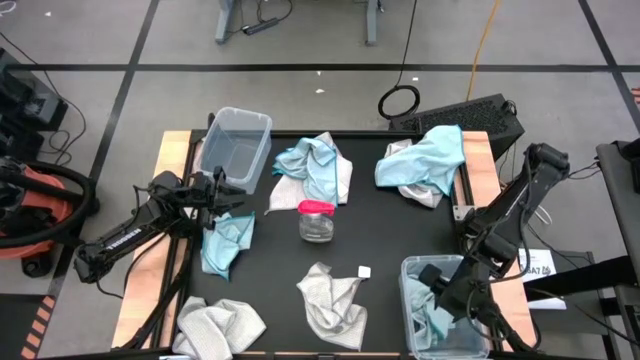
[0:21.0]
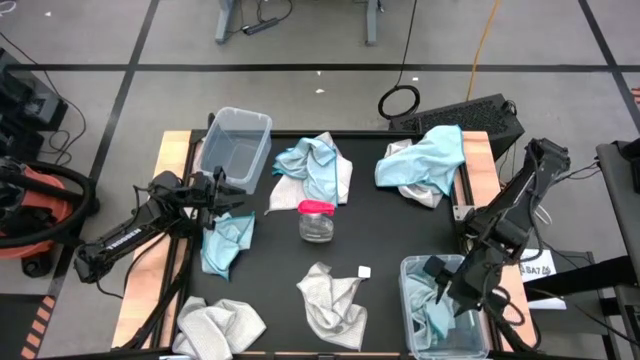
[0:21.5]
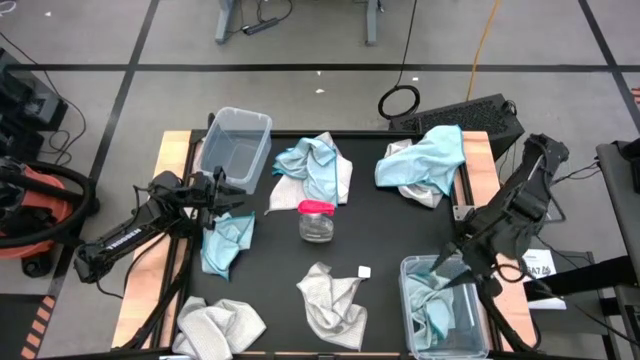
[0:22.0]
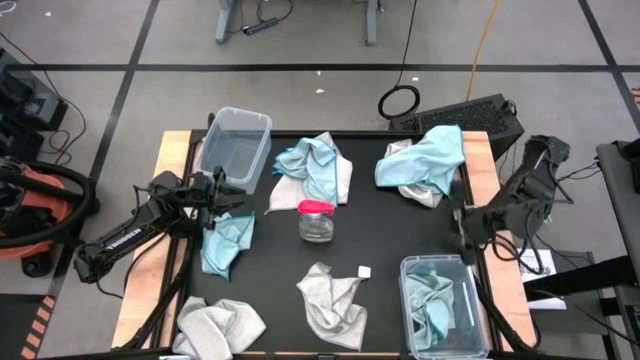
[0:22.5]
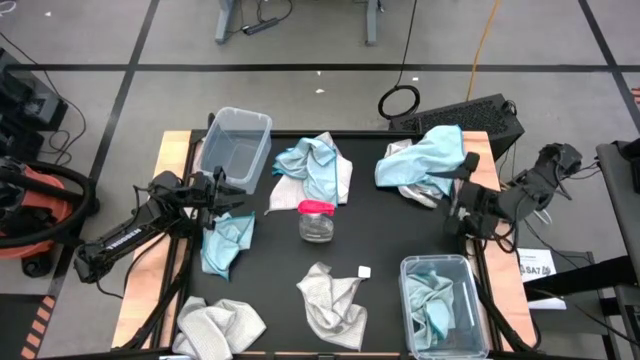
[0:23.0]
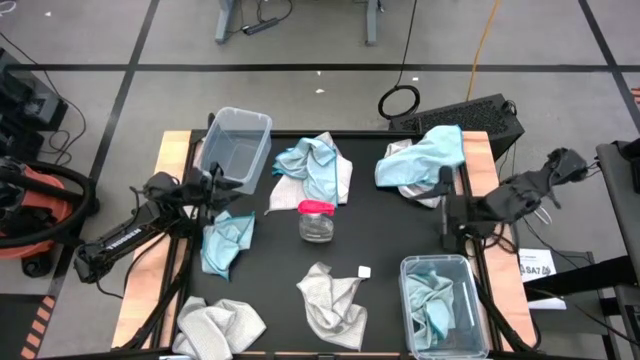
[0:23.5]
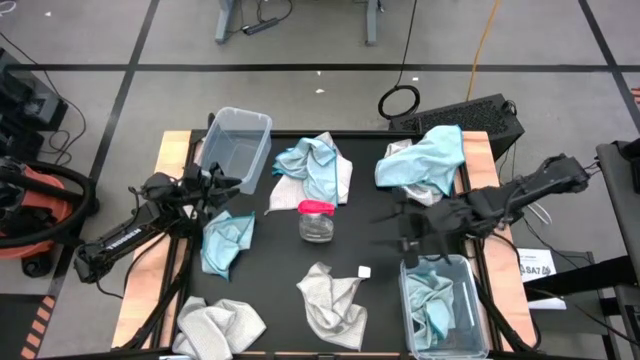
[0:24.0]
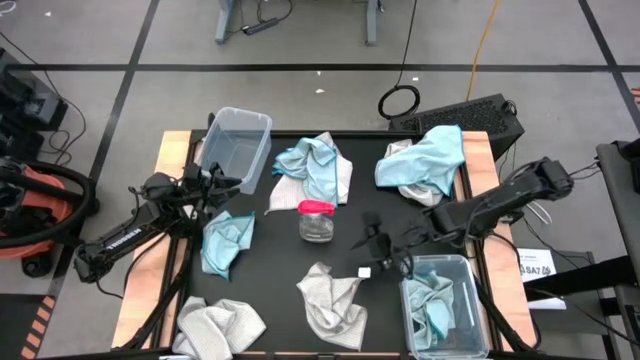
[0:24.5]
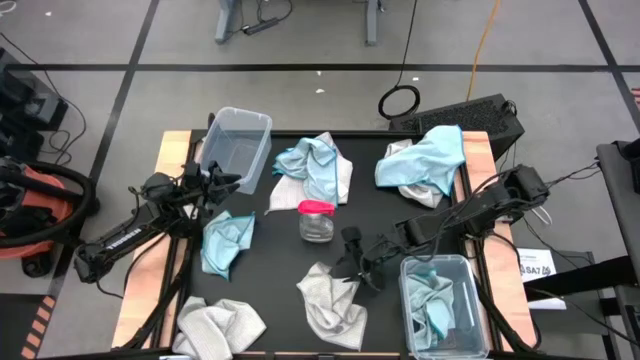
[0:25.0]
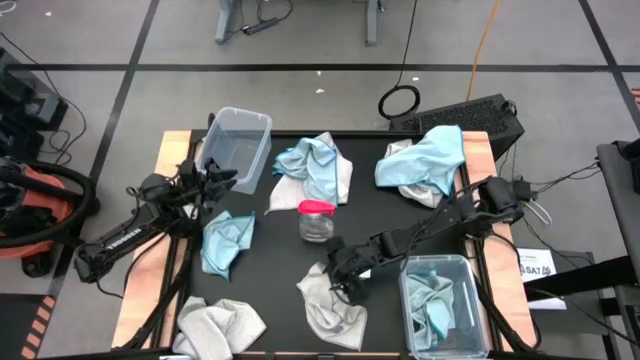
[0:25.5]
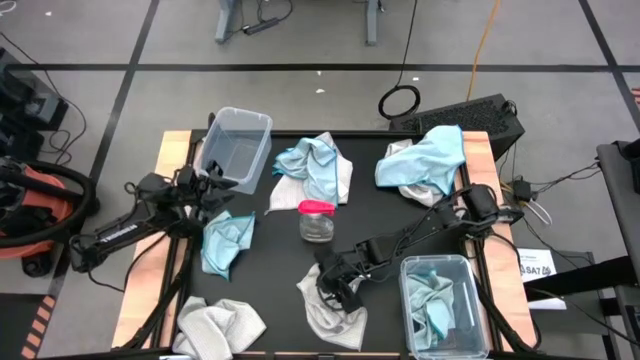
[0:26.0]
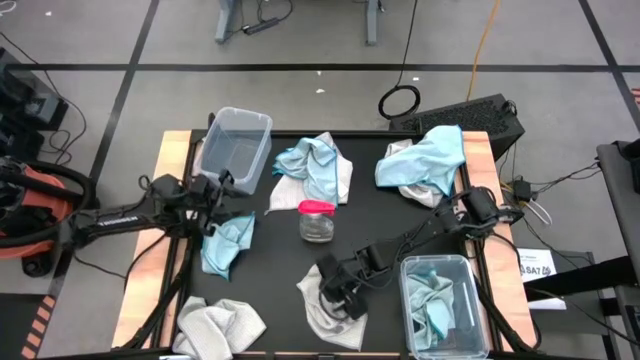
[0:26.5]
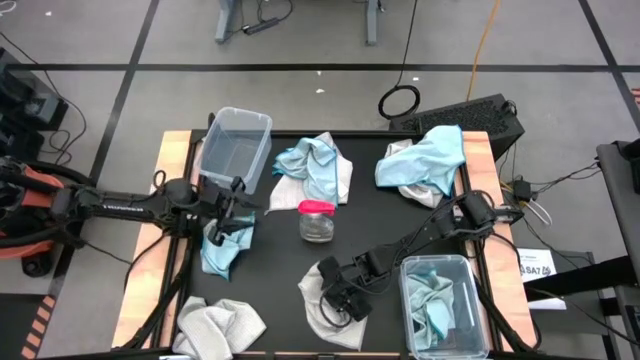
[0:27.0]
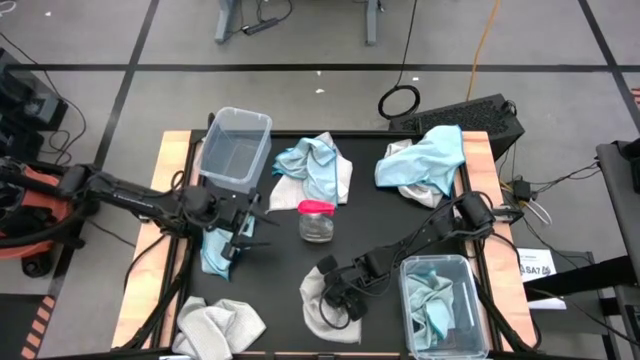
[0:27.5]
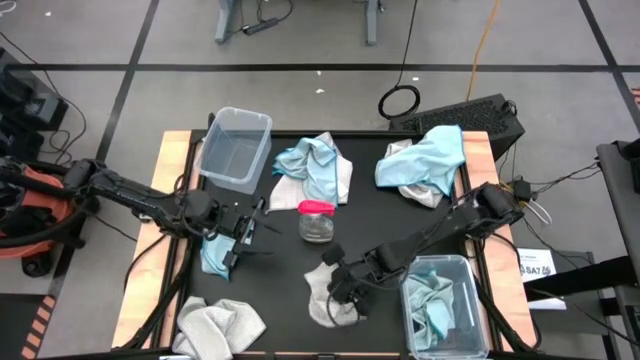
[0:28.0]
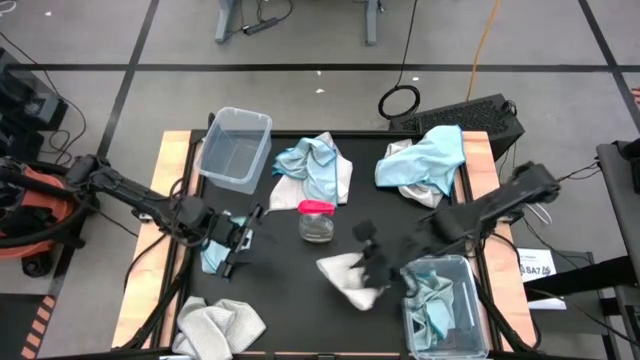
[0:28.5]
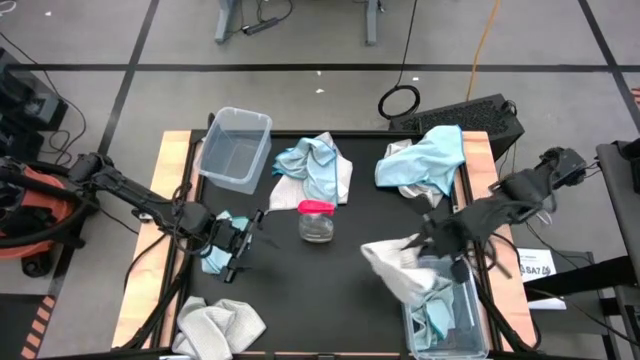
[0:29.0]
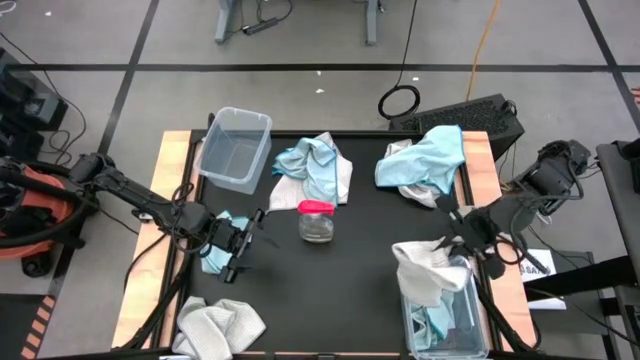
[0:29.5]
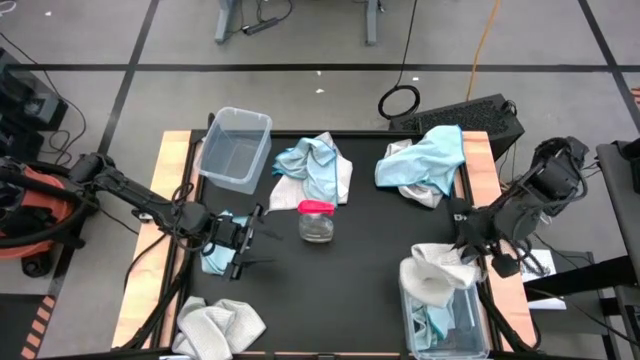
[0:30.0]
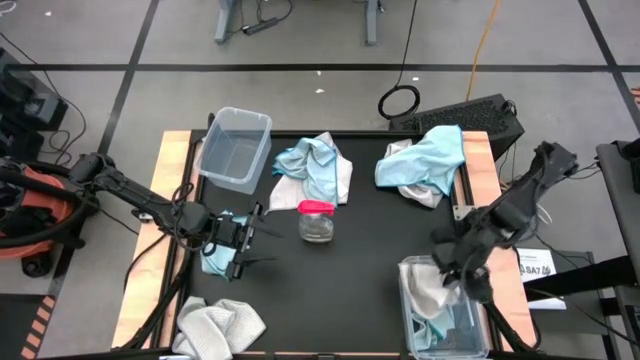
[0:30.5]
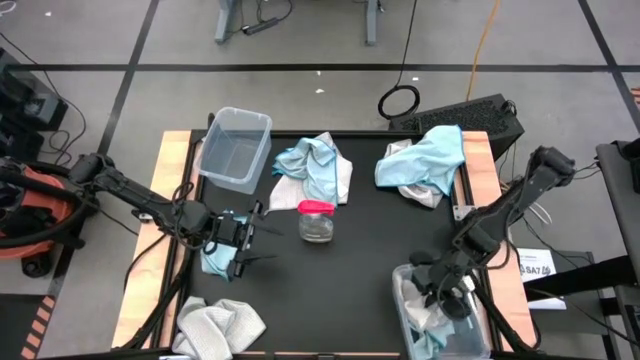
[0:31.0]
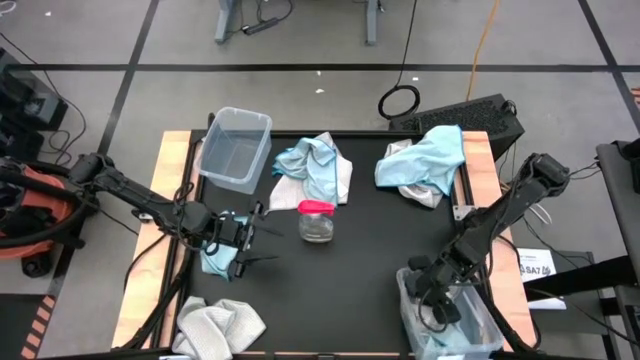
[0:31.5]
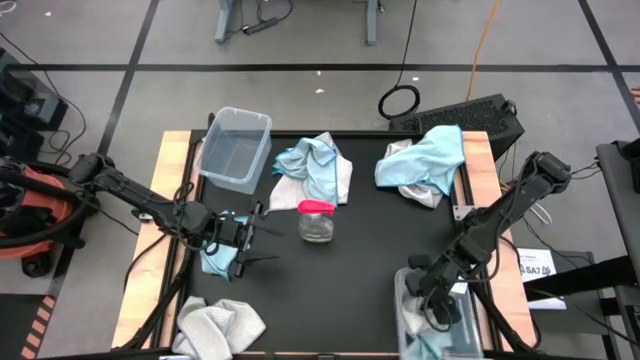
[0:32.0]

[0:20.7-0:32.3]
Task: Sort microfiber towel by color & place in baskets
Put the bottom right gray towel into the left transparent bin

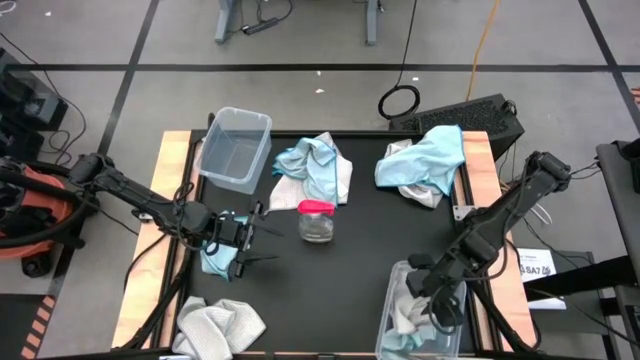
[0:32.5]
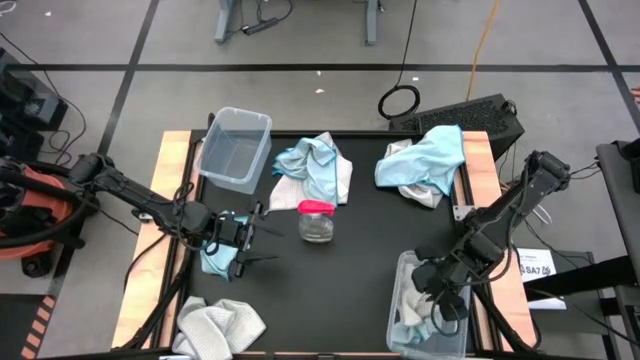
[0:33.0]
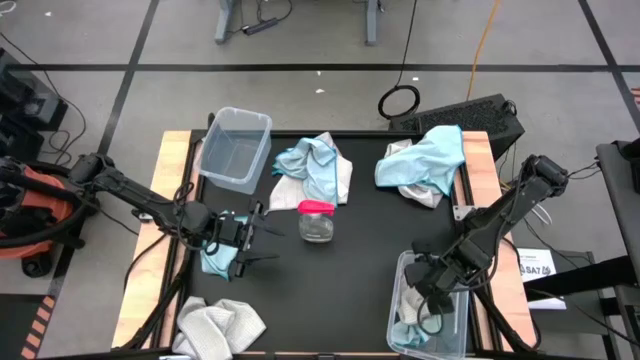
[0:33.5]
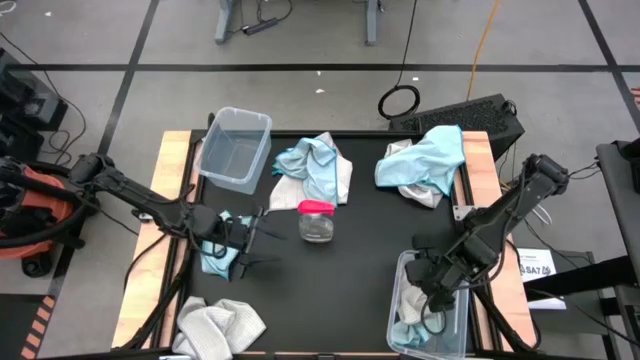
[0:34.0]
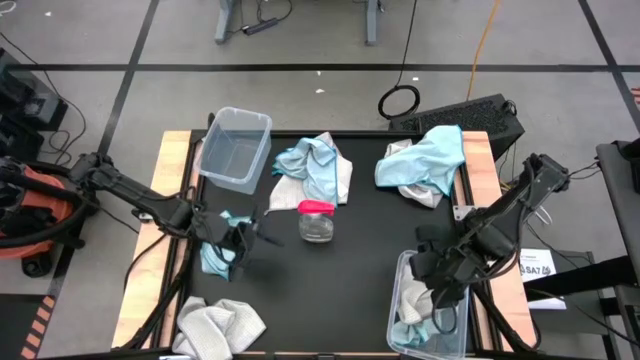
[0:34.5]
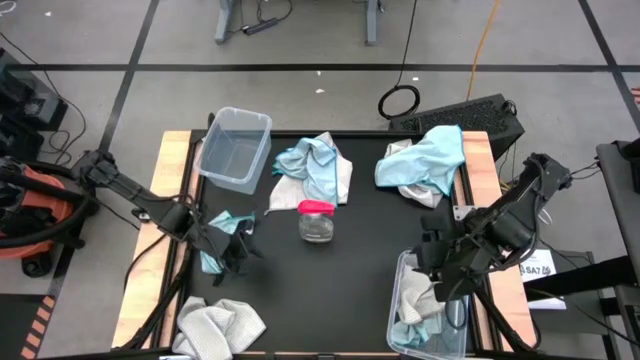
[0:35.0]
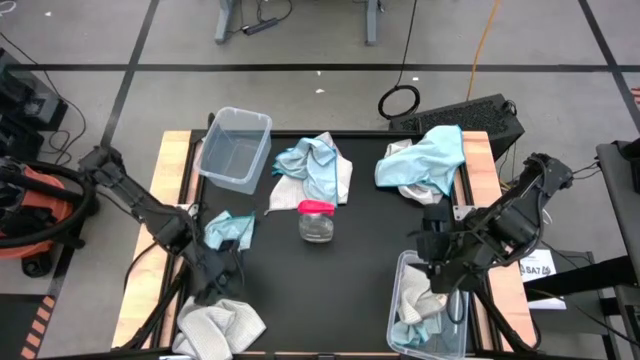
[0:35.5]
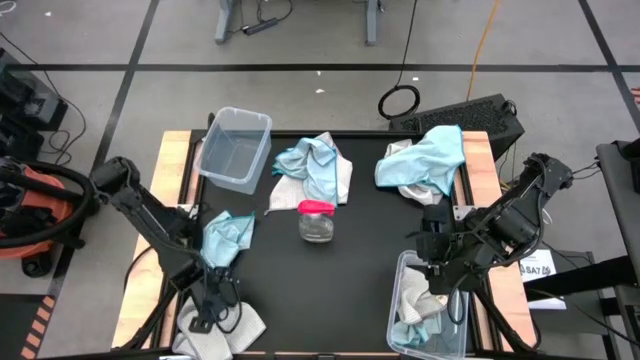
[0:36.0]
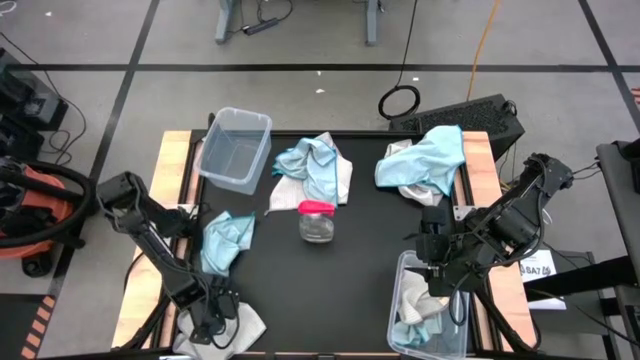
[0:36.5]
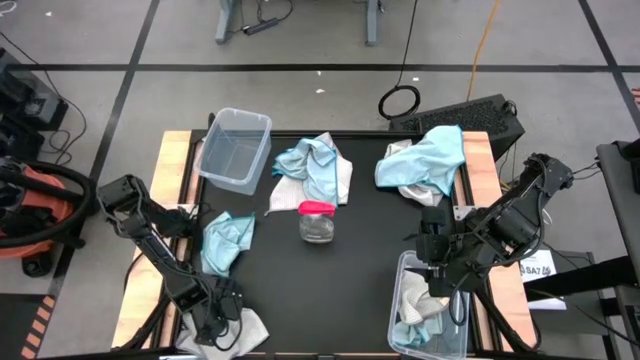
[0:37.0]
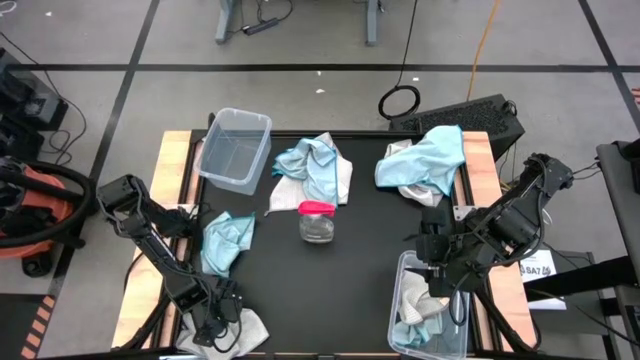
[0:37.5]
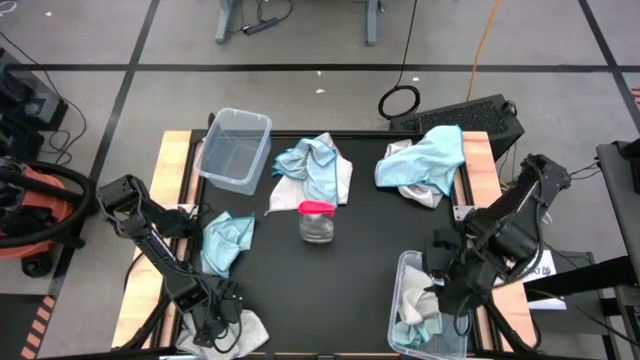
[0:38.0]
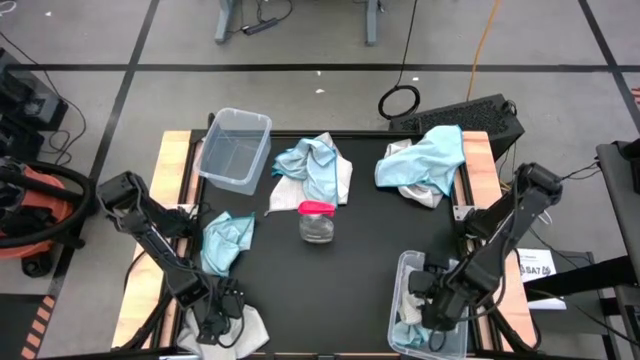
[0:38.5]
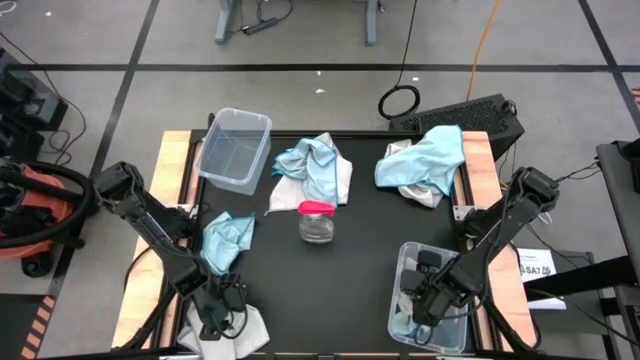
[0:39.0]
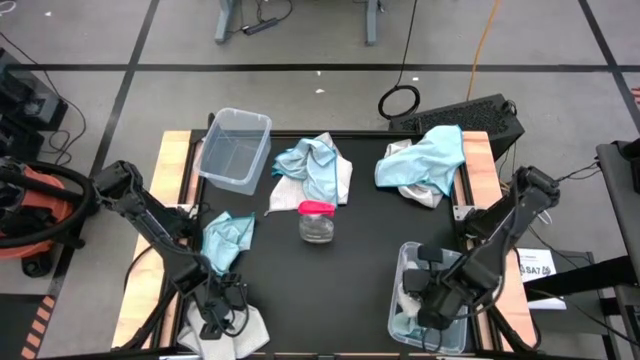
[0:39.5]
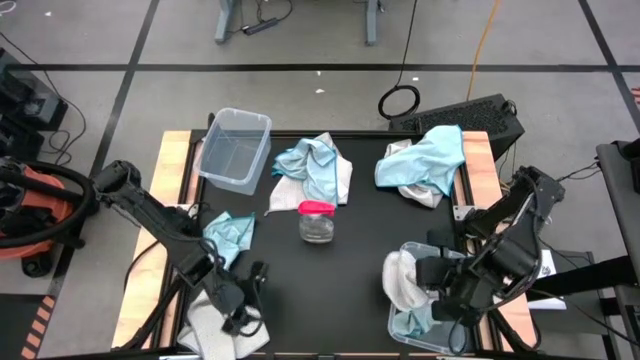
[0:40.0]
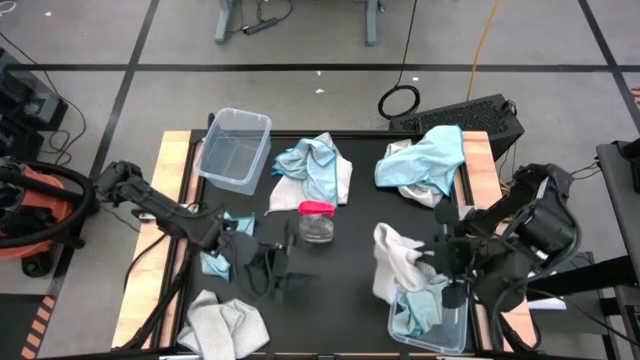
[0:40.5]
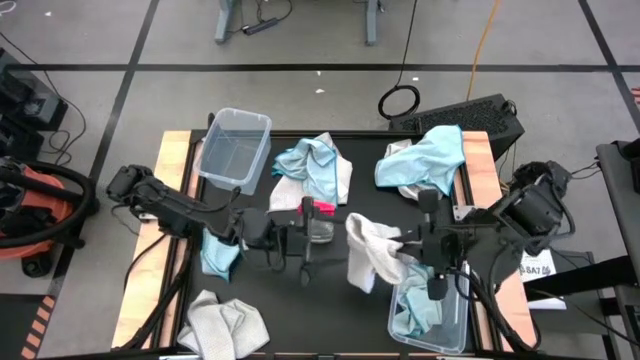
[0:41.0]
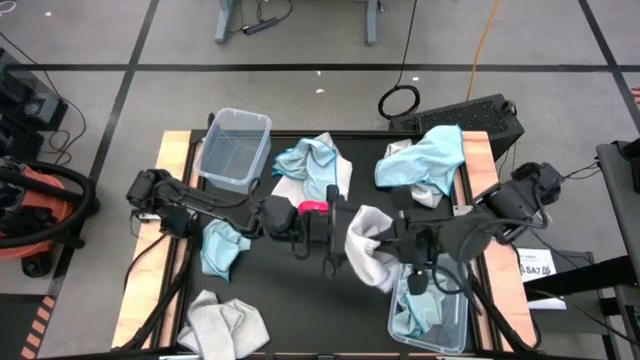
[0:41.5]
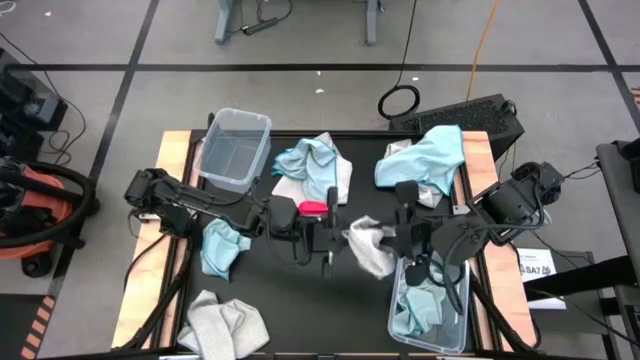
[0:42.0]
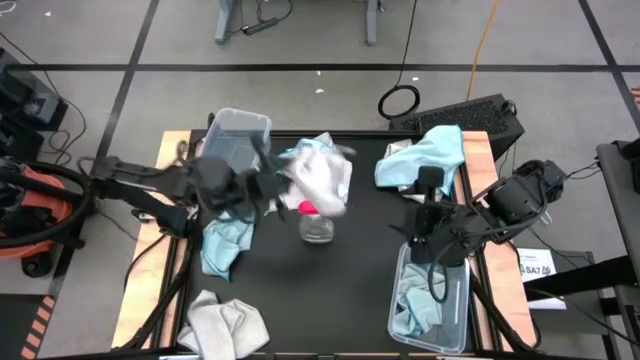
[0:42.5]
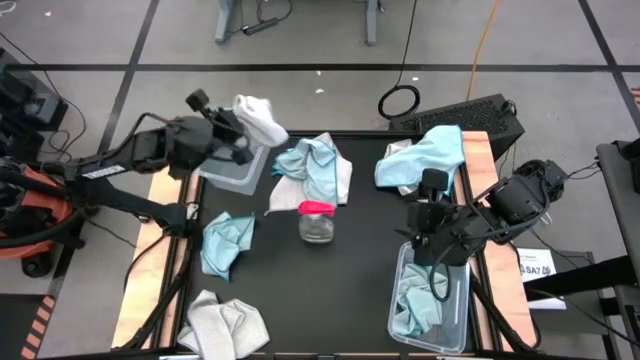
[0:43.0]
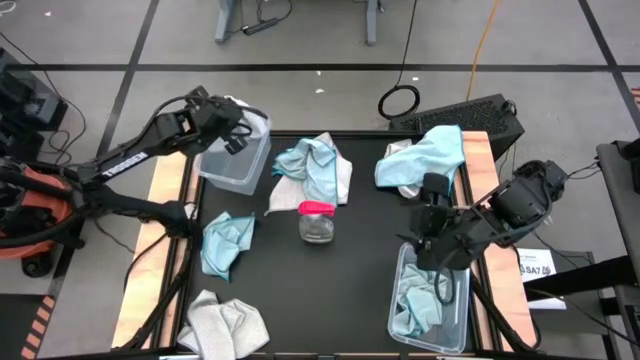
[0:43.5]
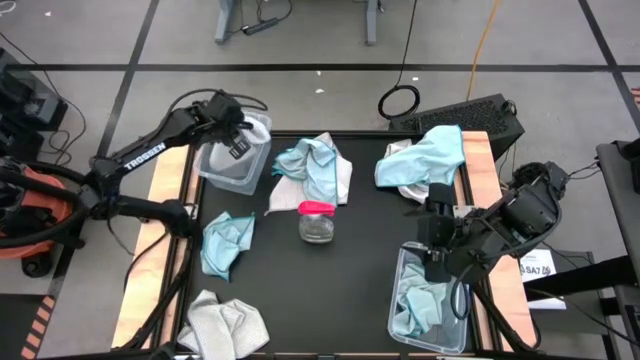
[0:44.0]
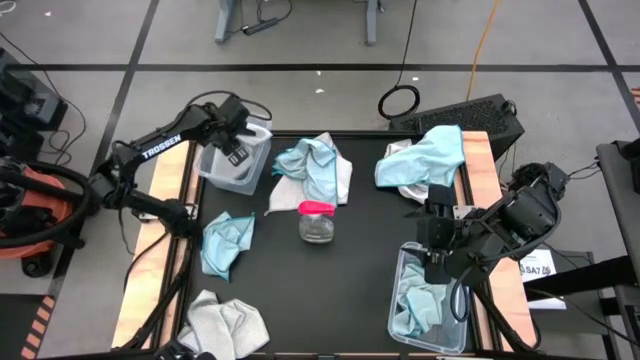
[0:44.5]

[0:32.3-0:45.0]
Put the bottom right gray towel into the left transparent bin
